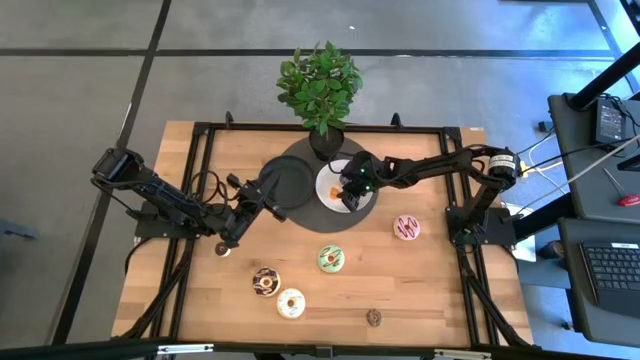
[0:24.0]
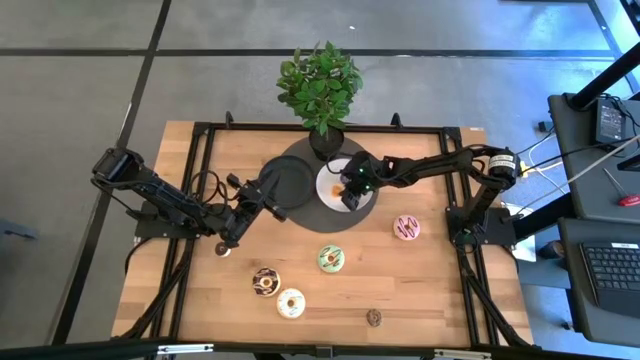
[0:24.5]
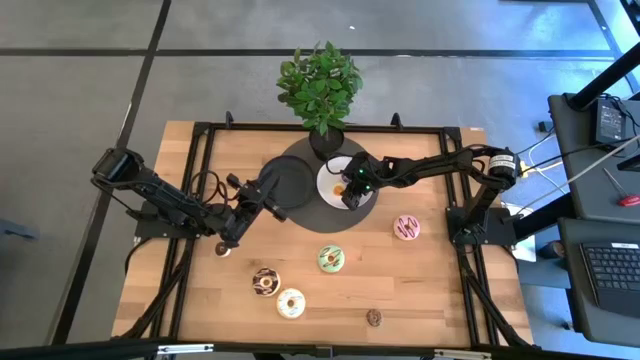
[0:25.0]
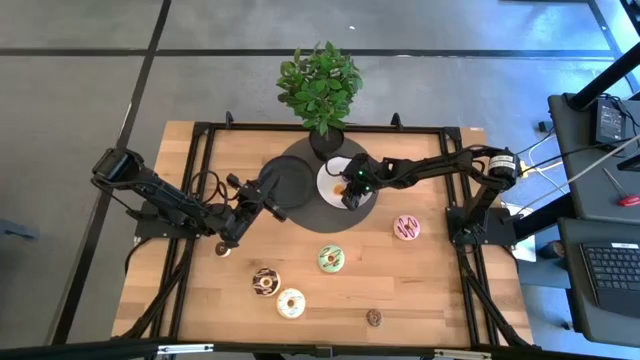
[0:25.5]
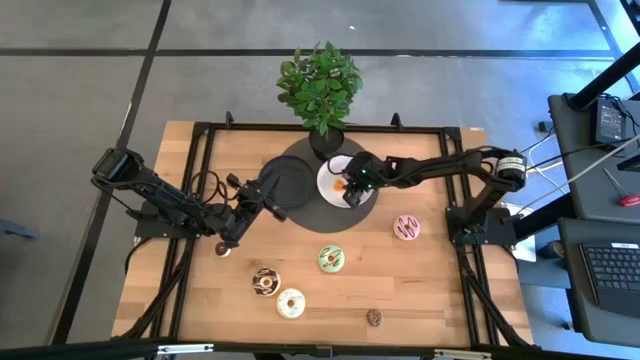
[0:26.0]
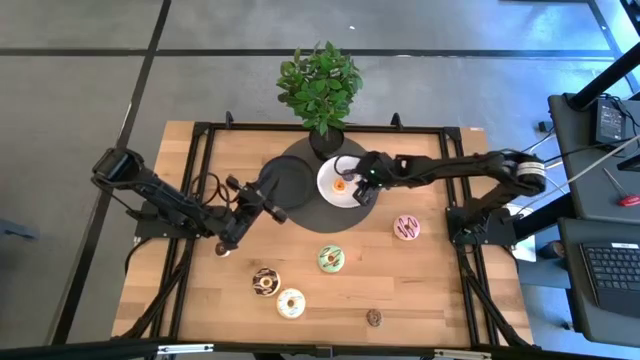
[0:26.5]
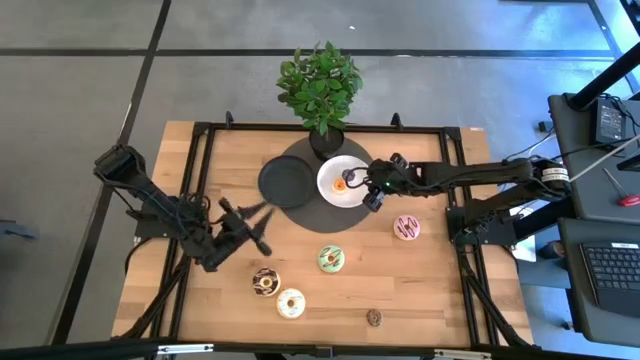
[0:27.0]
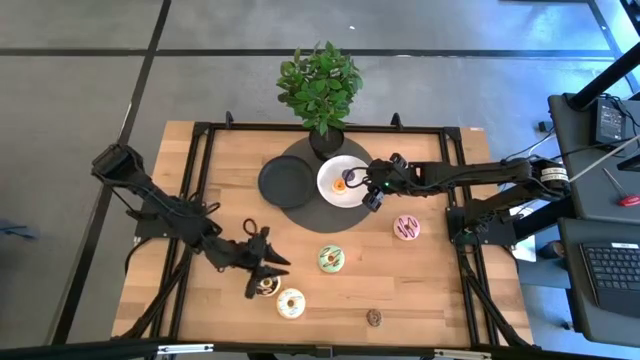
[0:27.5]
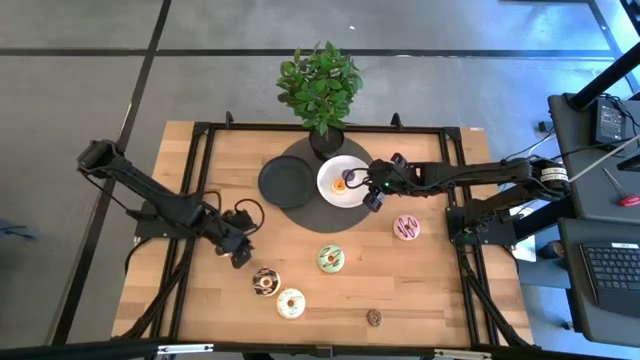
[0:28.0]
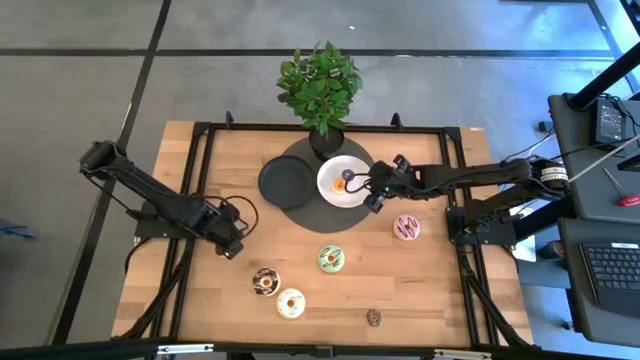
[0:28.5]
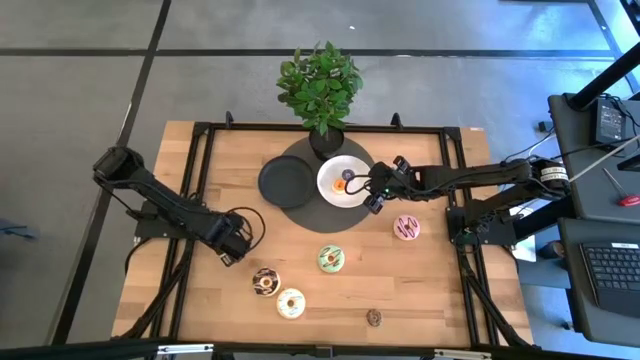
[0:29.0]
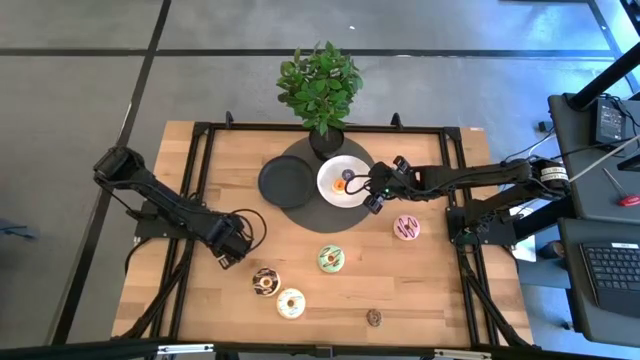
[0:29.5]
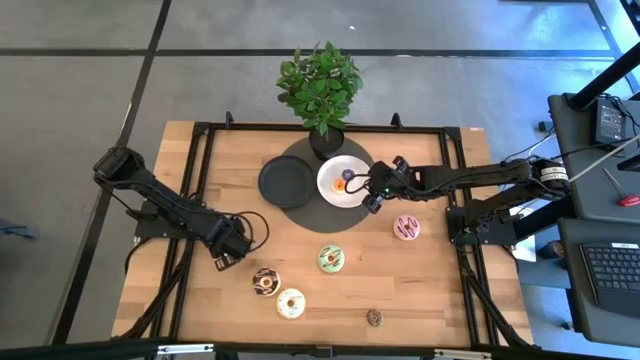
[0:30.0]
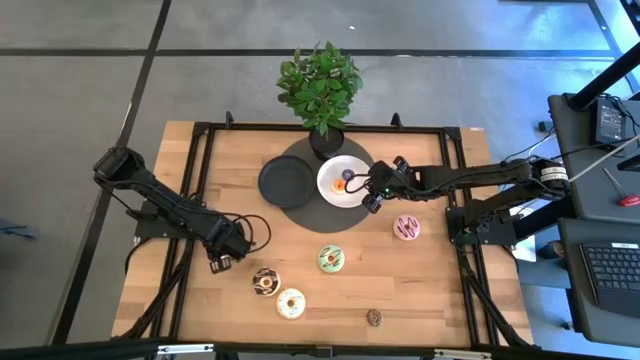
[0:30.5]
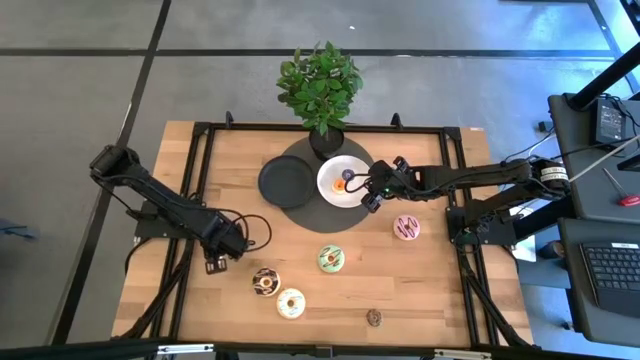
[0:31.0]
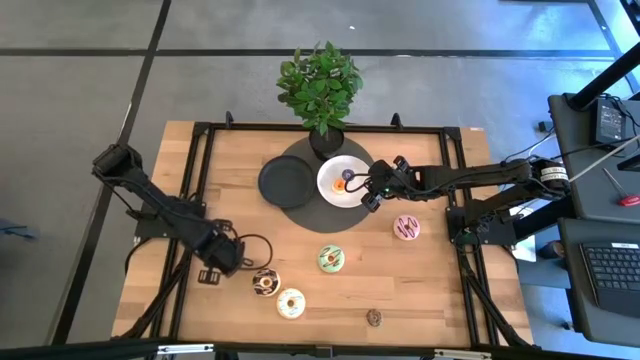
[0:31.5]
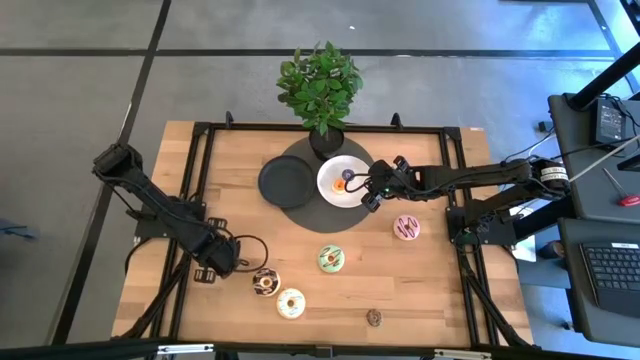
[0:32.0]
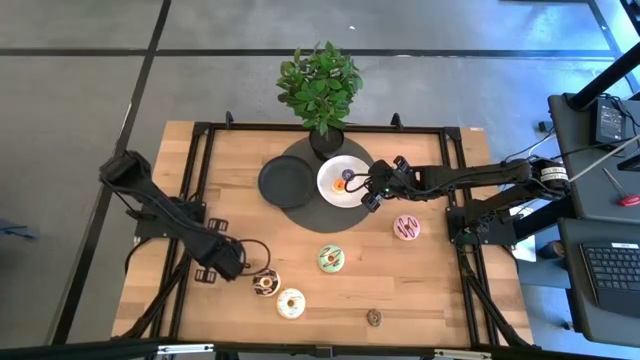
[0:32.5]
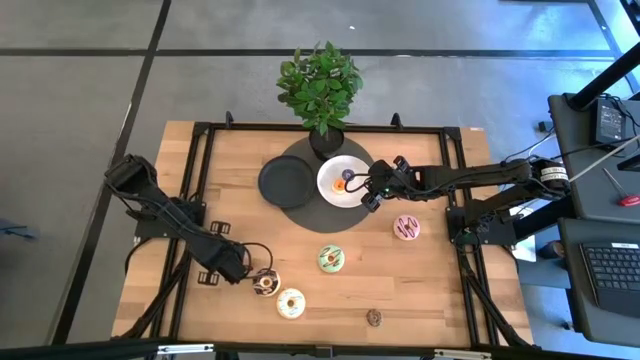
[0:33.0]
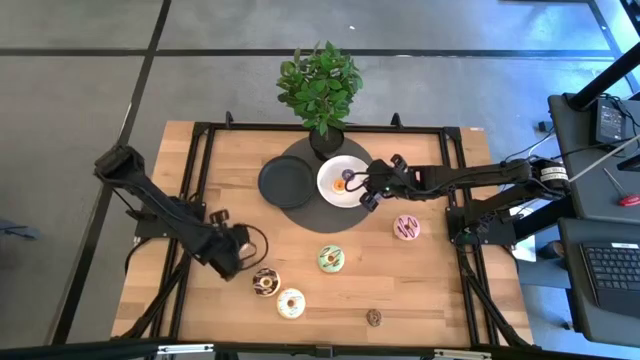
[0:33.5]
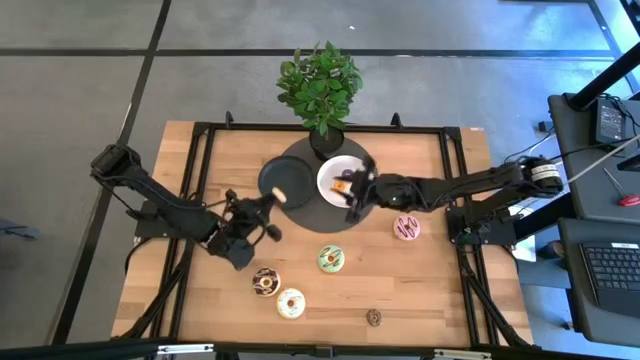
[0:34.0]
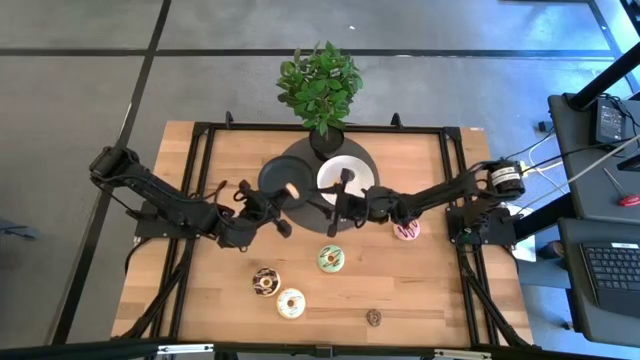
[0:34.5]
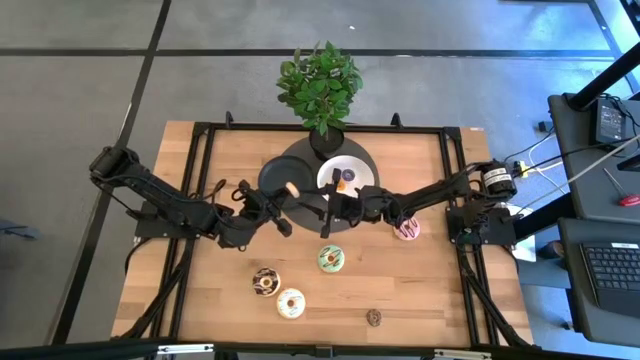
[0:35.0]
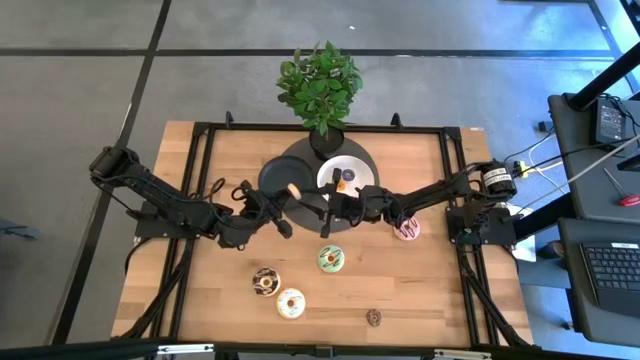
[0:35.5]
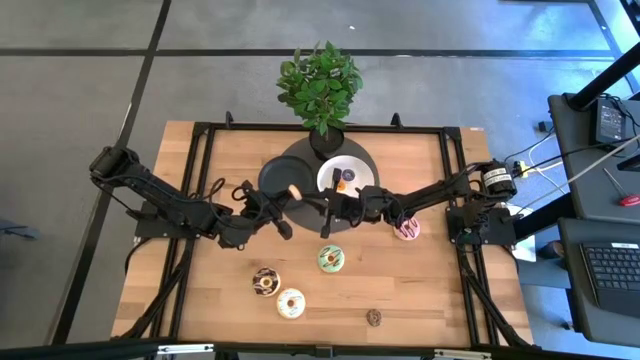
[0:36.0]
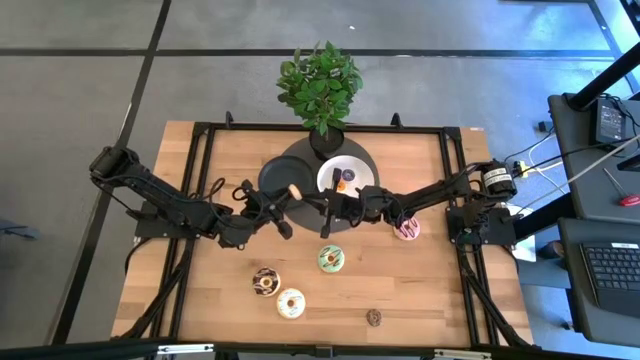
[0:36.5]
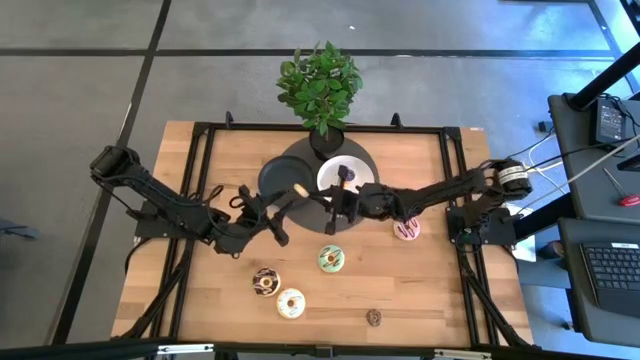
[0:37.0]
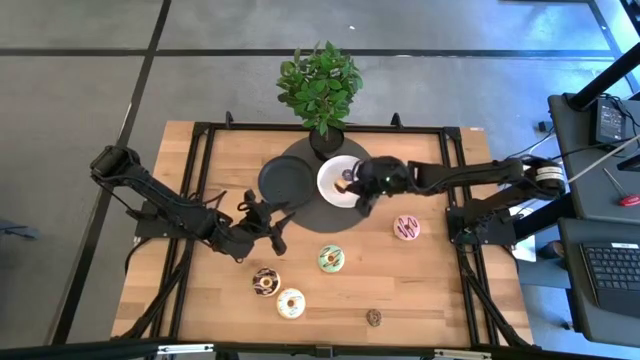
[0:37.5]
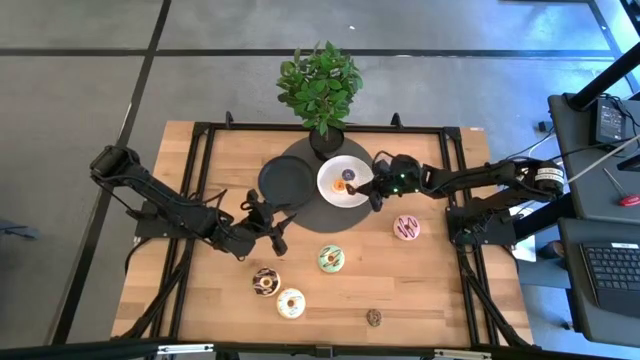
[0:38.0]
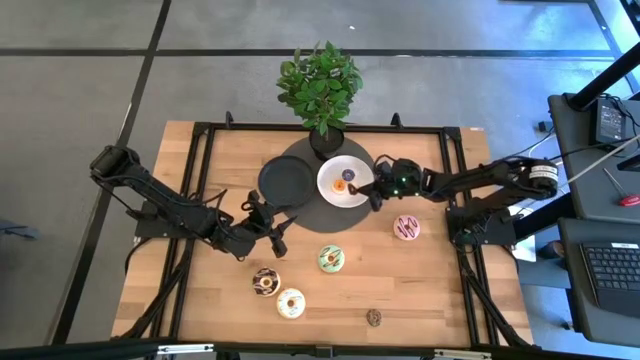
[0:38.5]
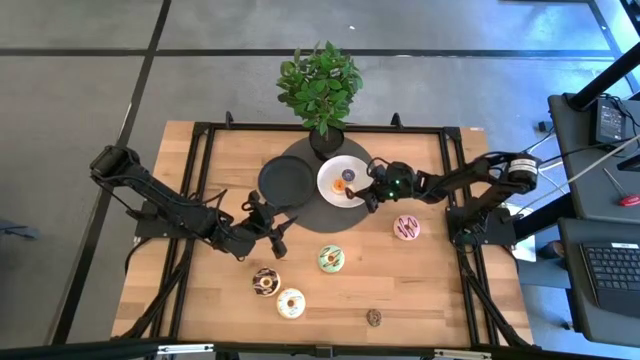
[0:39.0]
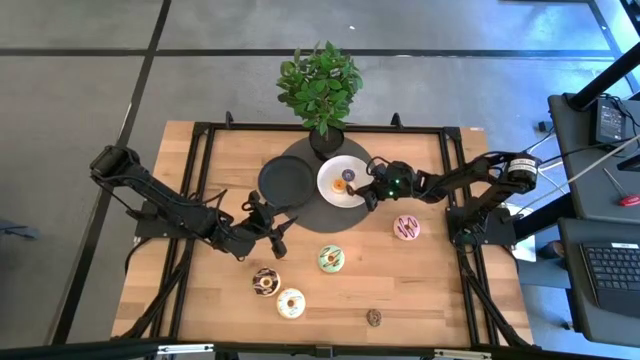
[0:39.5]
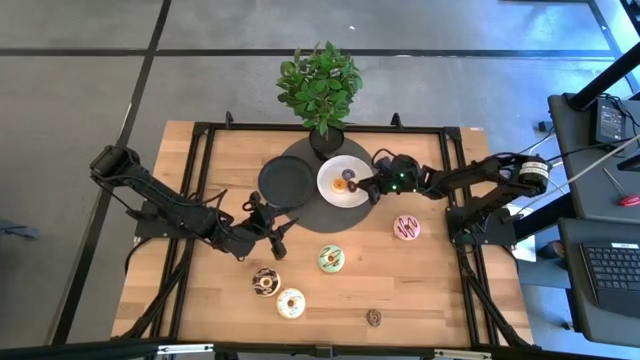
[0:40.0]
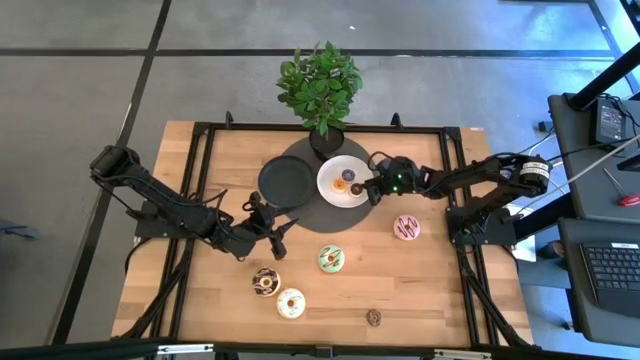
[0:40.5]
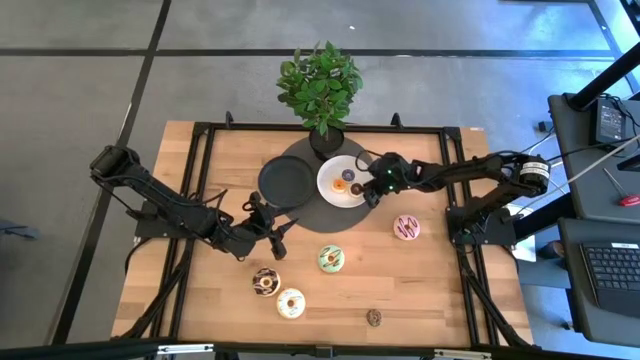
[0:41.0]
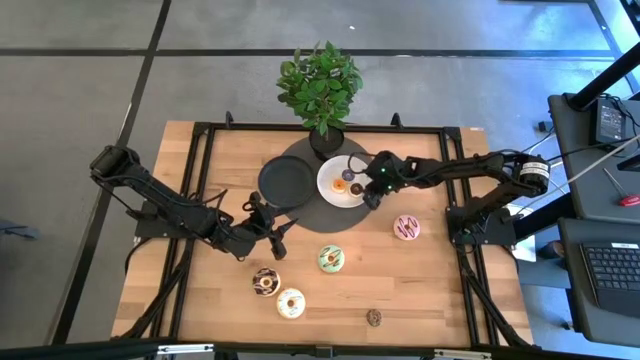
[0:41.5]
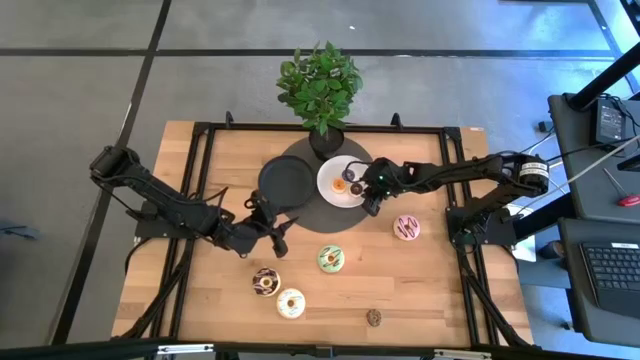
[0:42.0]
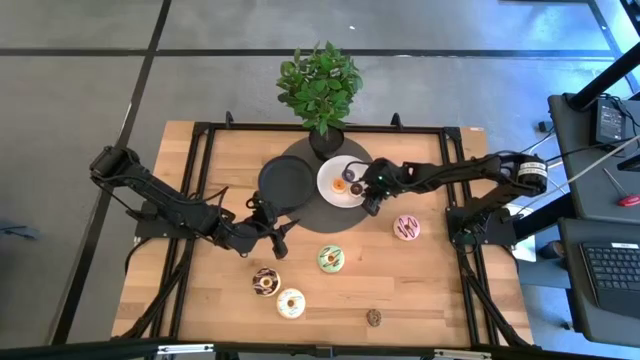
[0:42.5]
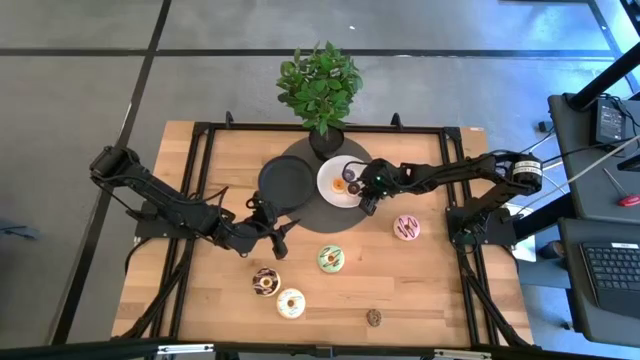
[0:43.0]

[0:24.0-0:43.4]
Task: Pick & Place donuts
Put the small black donut on the white plate

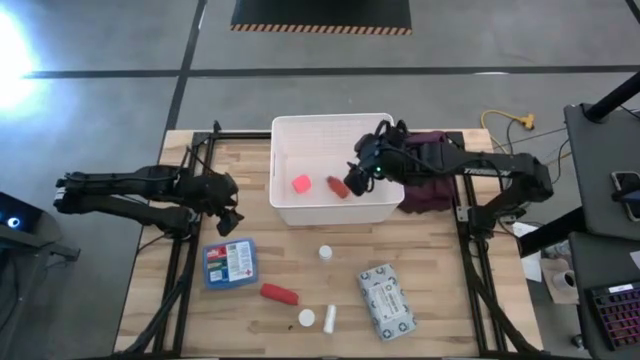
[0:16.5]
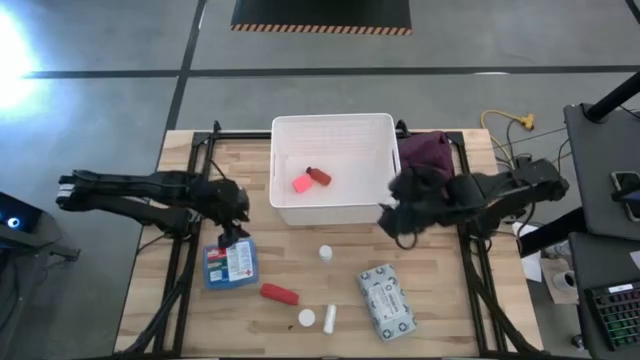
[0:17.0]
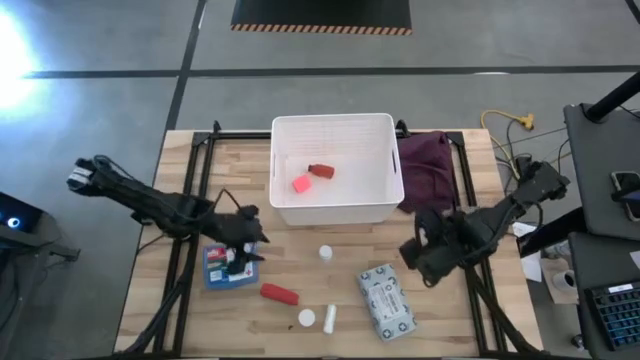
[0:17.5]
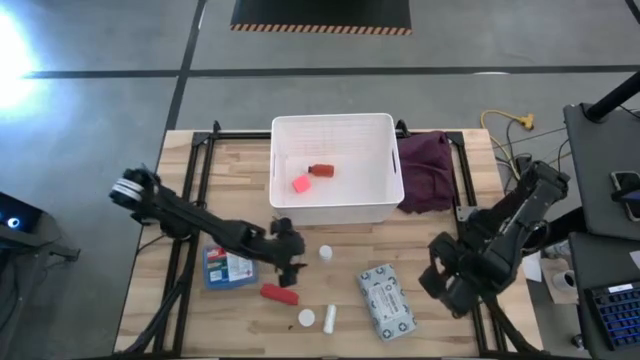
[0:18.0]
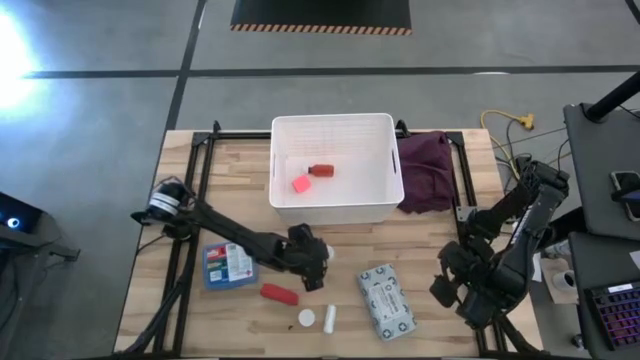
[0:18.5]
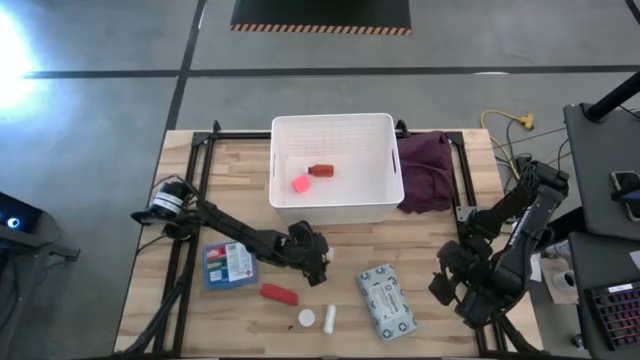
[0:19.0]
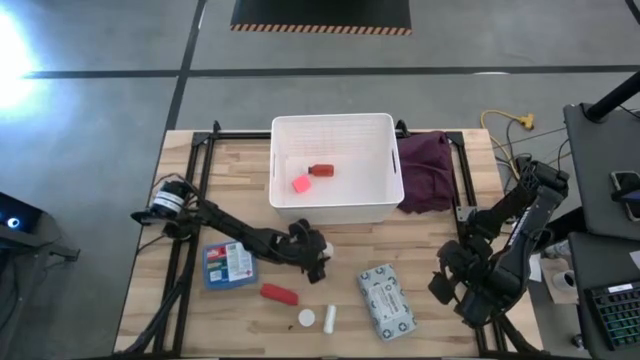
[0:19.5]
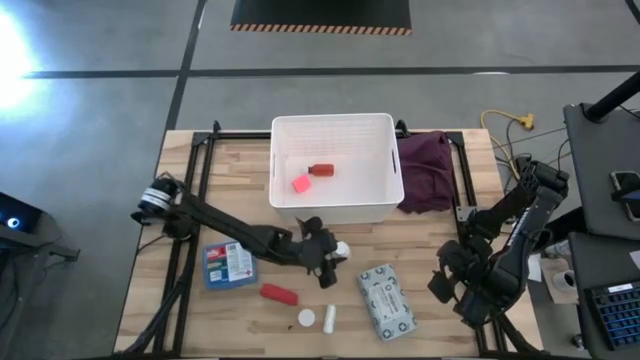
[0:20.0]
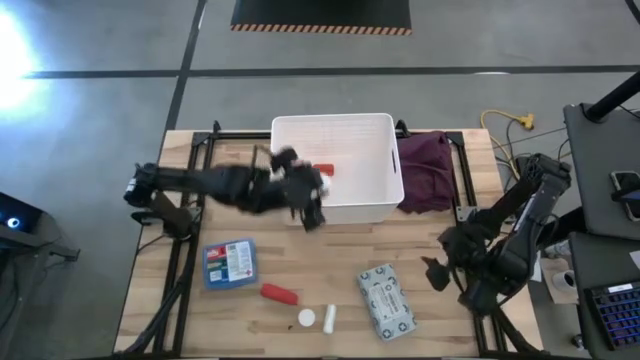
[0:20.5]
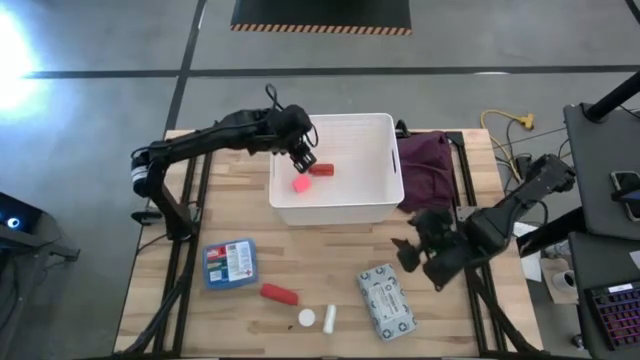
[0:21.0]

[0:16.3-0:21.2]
Task: Pick & place medical supplies in basket/bin
Put the white medicine bottle into the white bin
